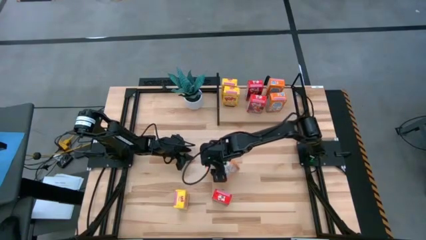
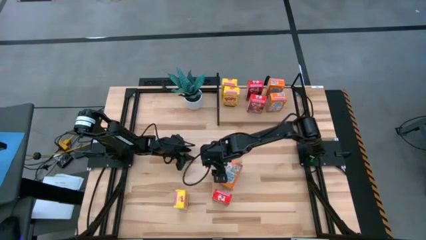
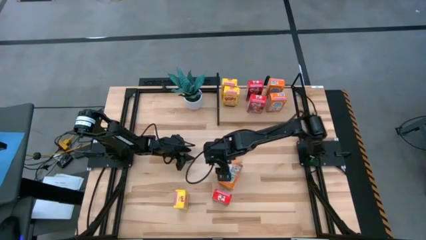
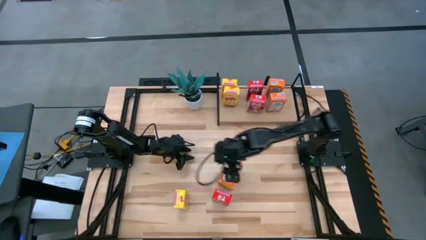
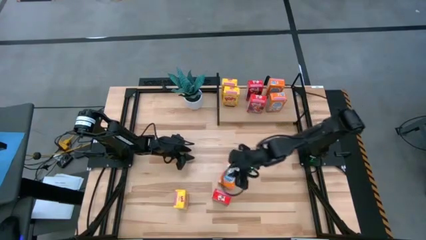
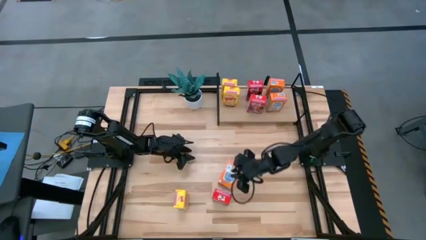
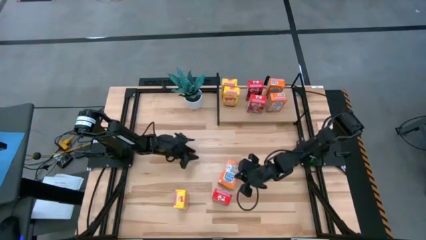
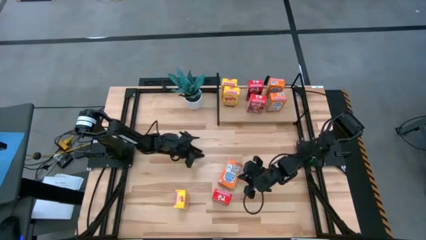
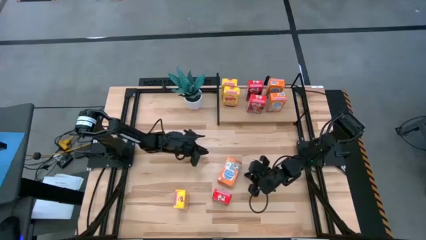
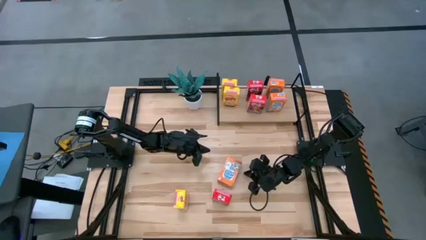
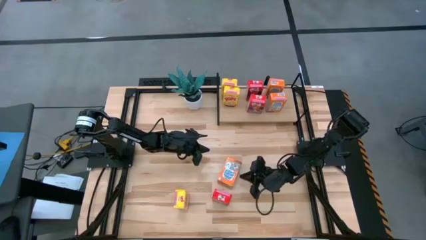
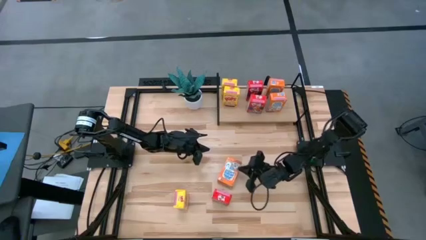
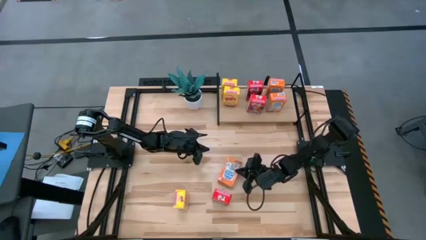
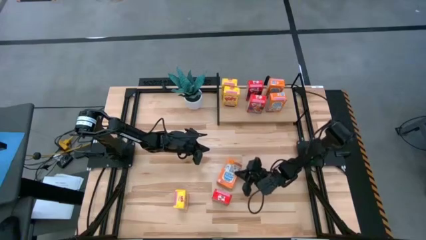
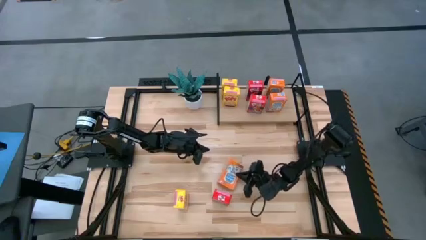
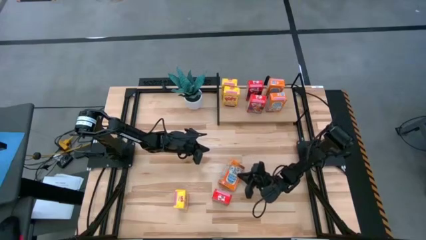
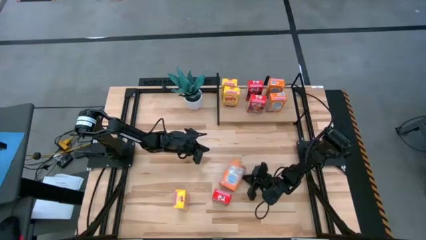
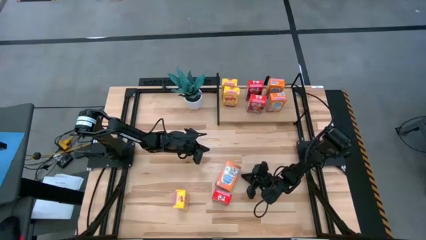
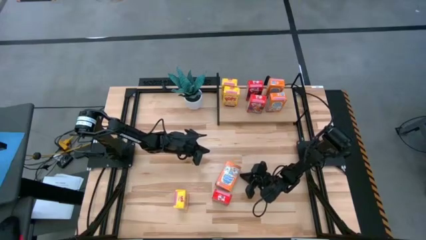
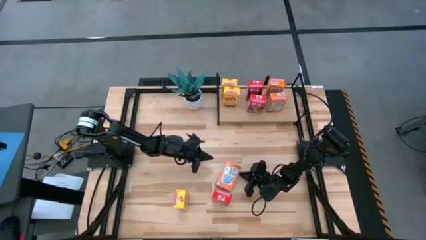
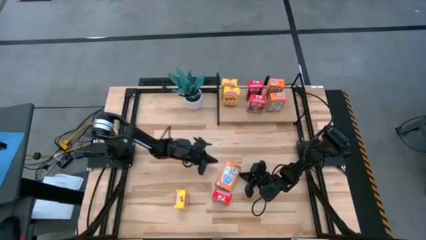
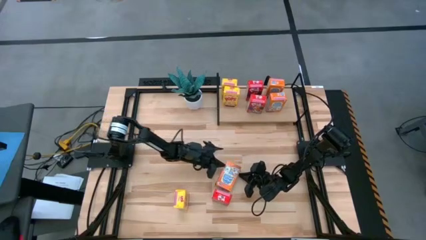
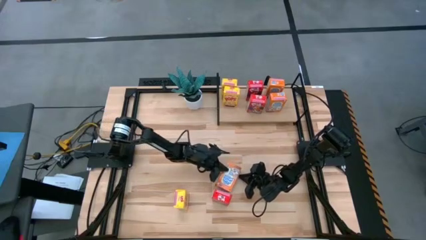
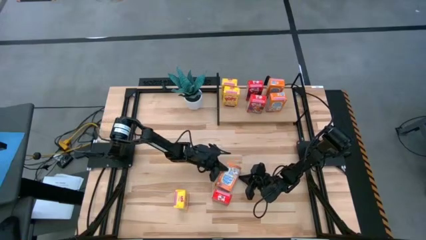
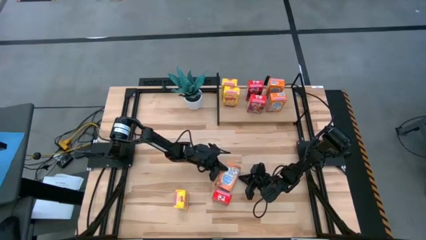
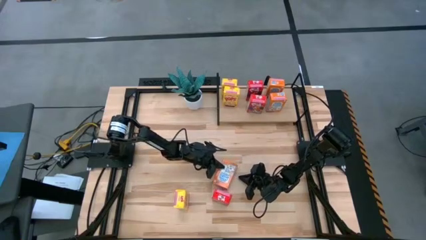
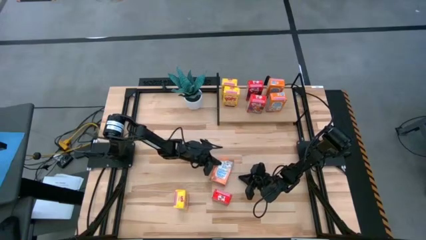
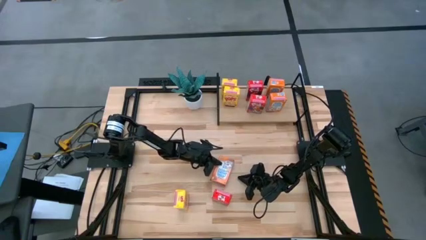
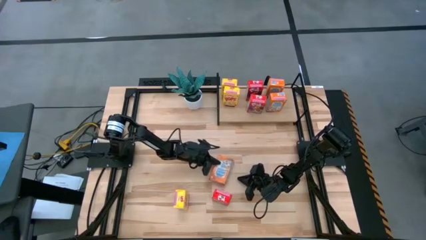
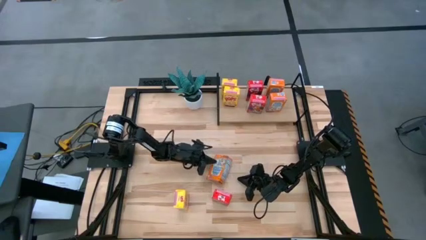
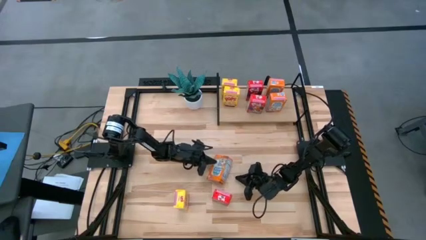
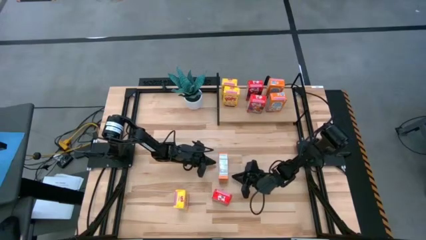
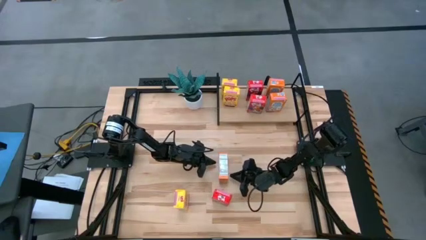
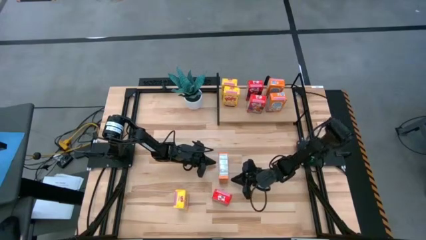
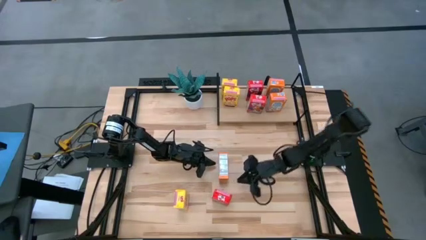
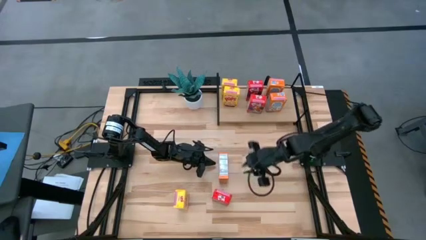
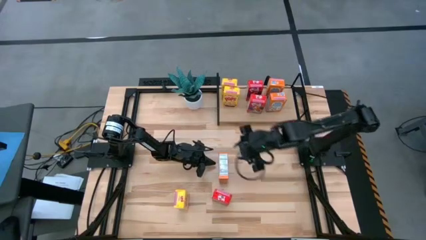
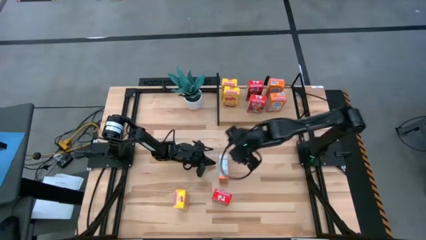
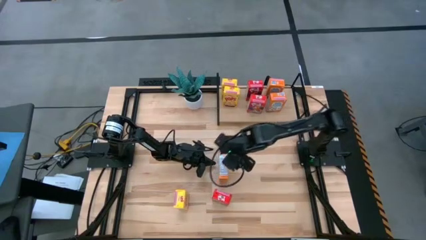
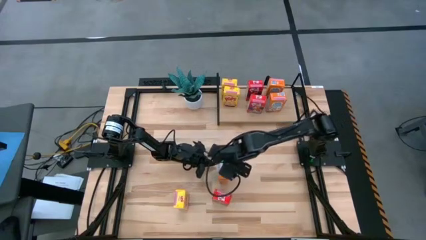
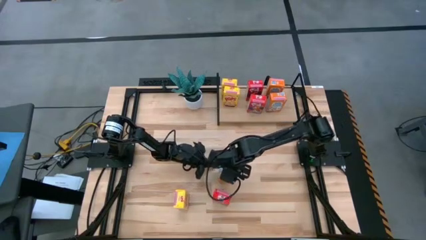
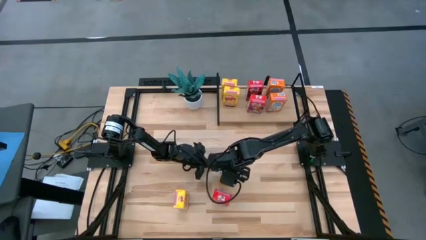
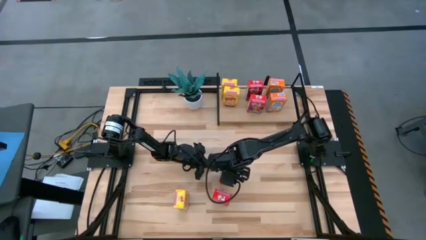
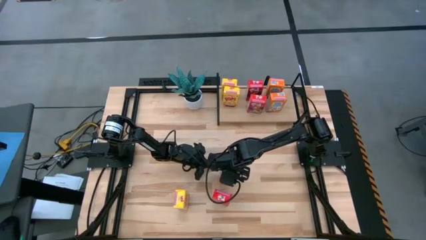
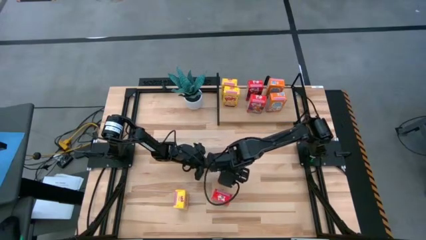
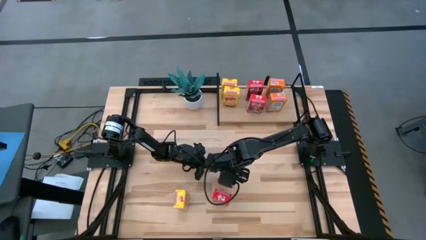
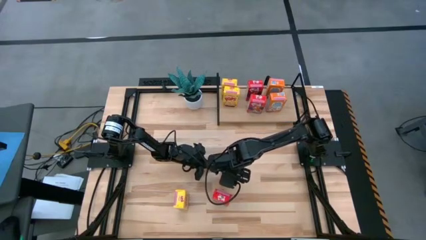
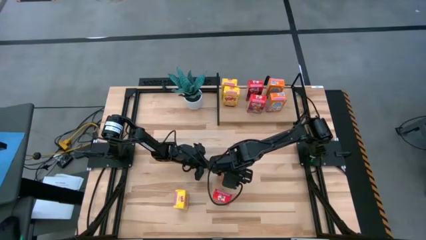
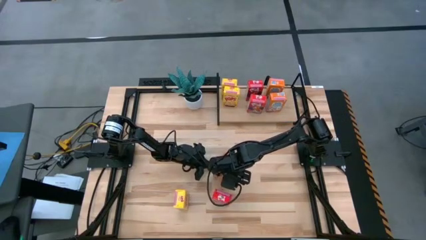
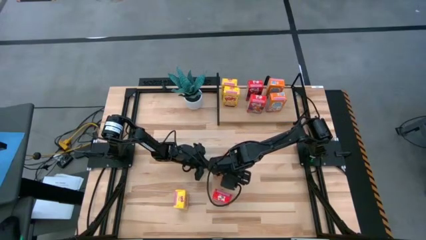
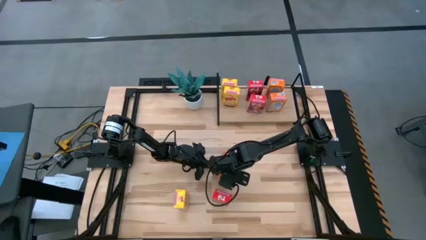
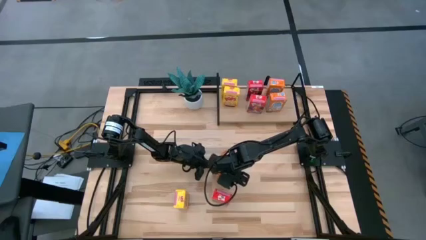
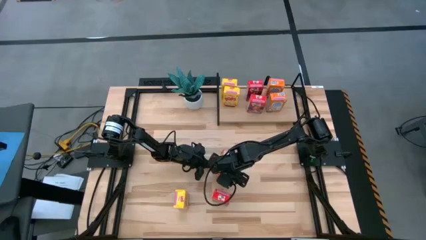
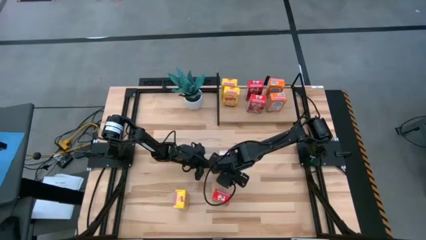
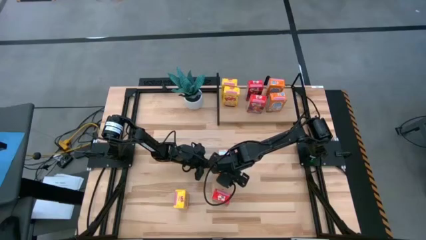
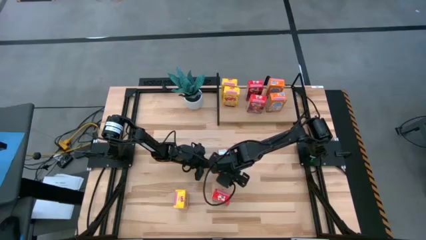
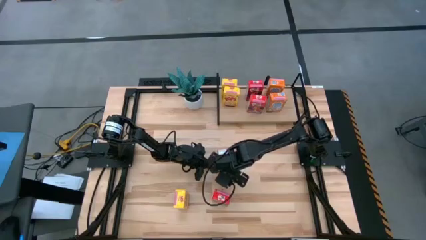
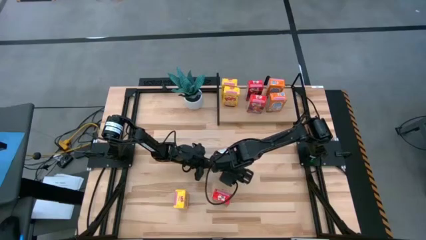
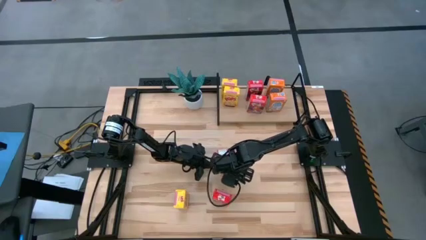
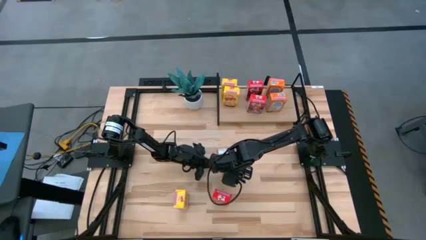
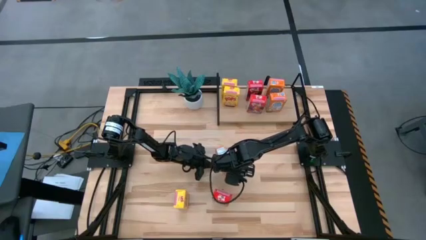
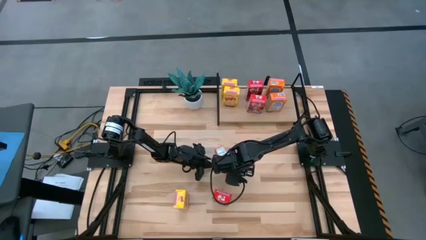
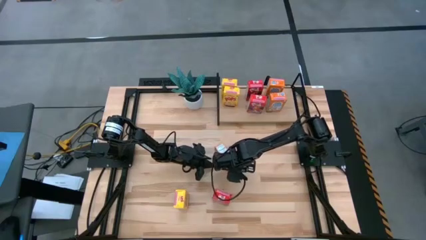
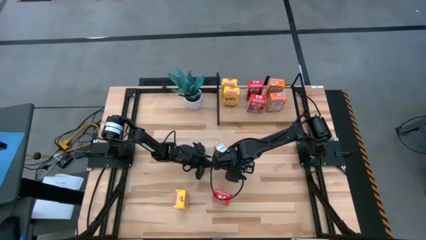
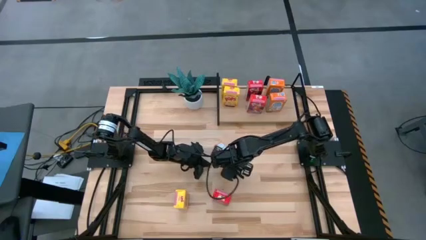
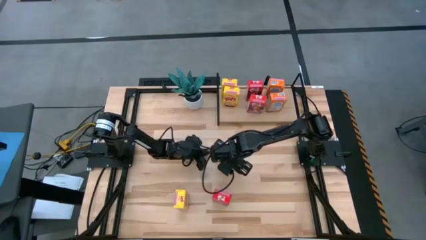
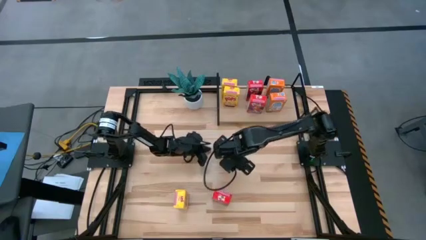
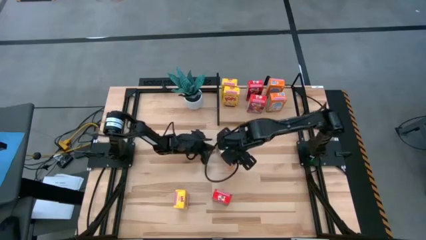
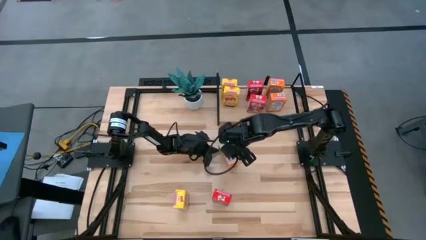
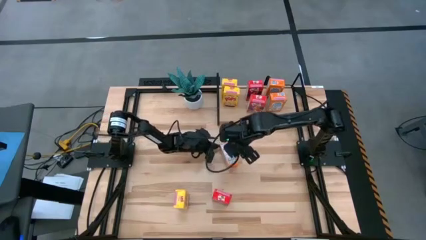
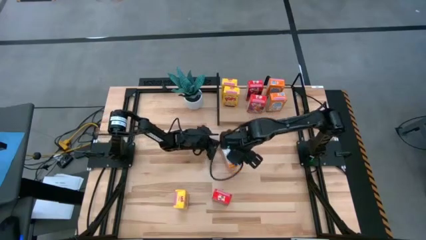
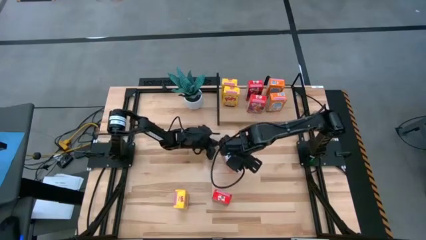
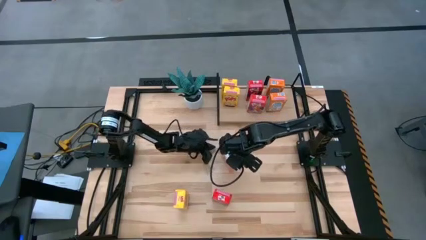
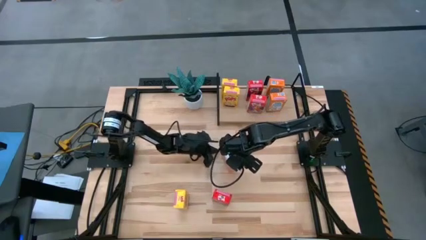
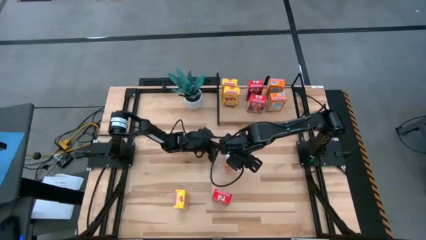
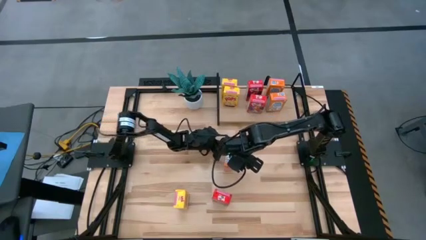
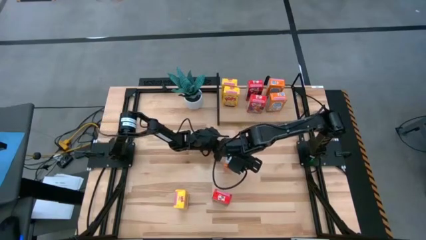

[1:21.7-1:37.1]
Task: Stack cereal on shelf
Put the orange cereal box on the shelf aligned with orange cereal boxes

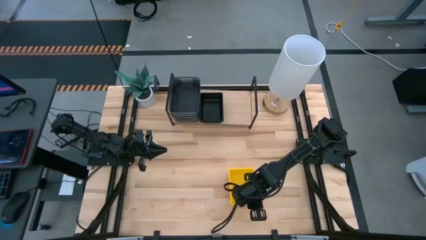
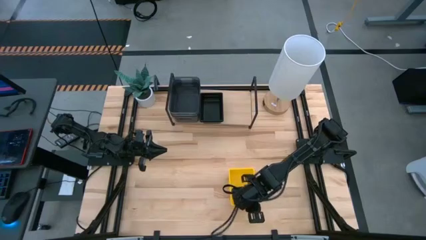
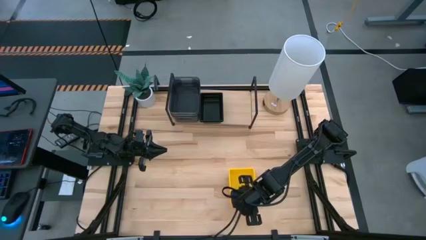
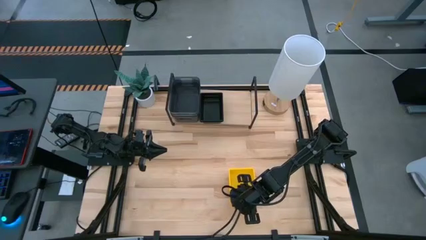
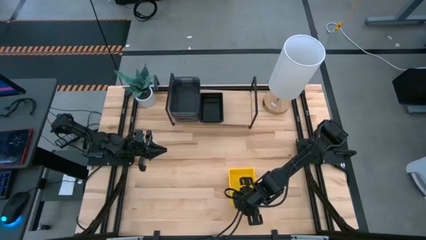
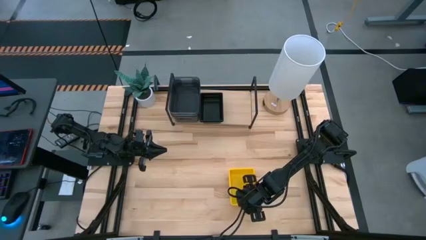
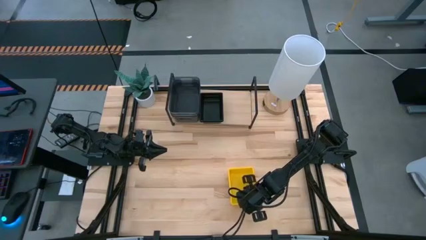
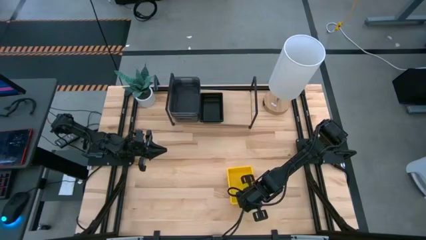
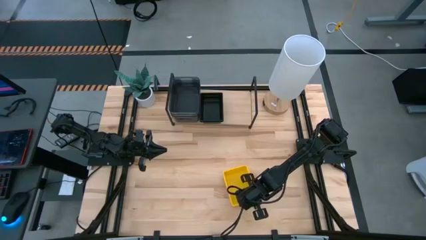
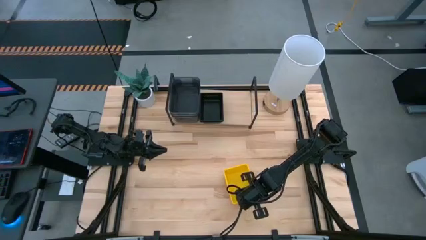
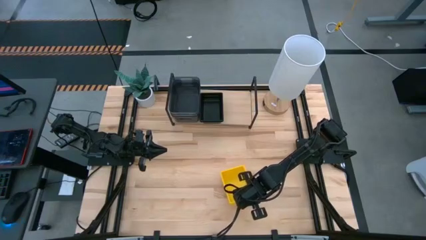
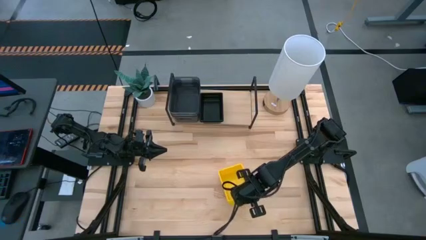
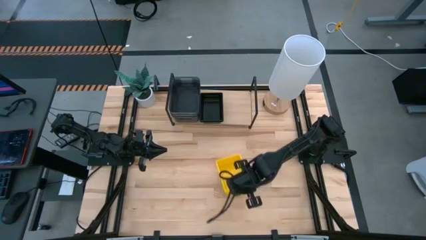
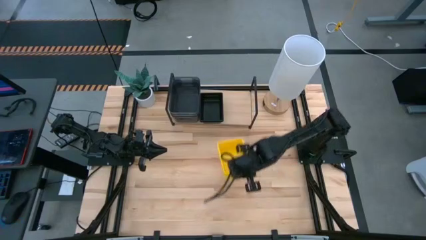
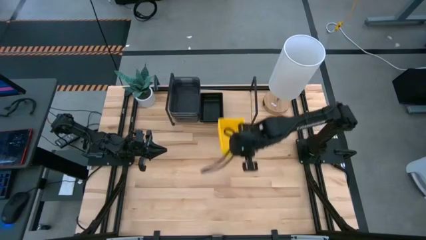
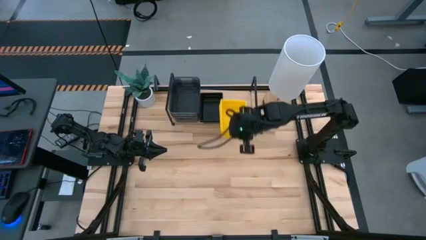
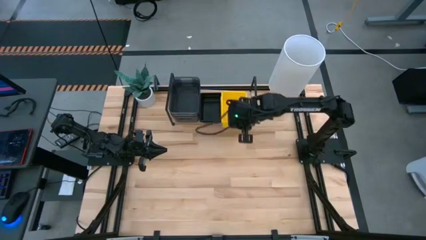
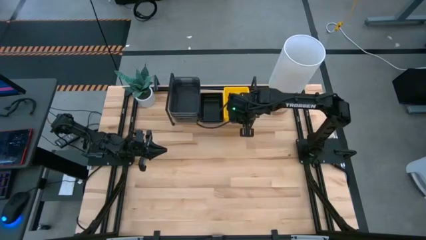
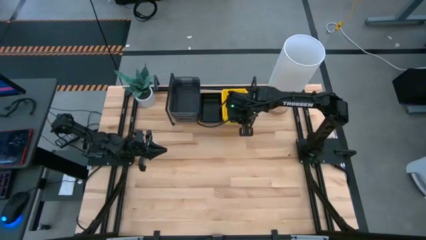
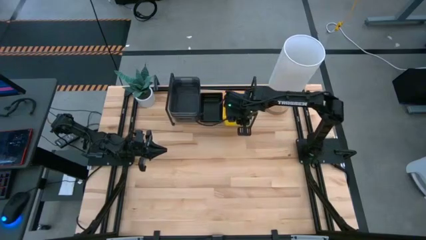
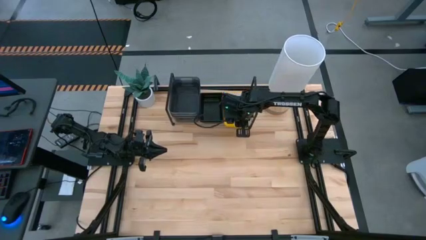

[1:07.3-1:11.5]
Task: Stack baskets on shelf by color
Put the stacked yellow baskets on the shelf
